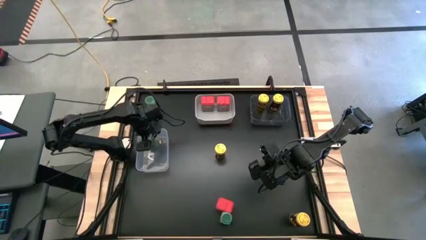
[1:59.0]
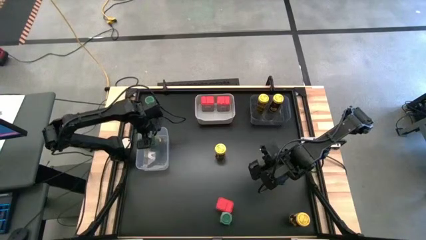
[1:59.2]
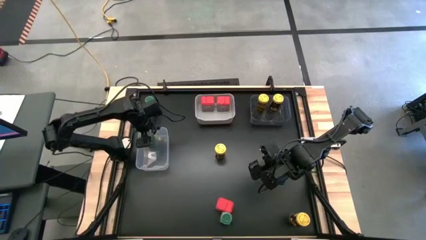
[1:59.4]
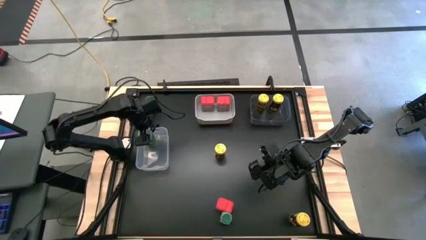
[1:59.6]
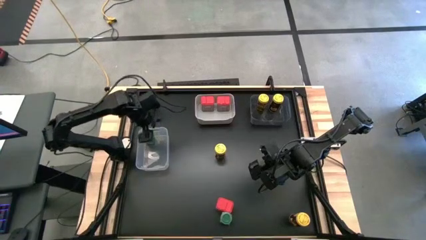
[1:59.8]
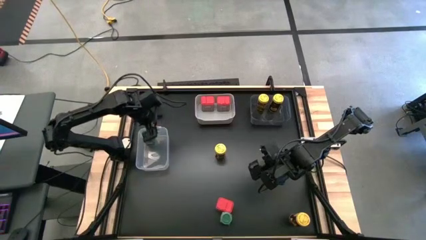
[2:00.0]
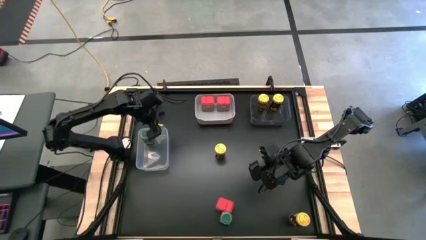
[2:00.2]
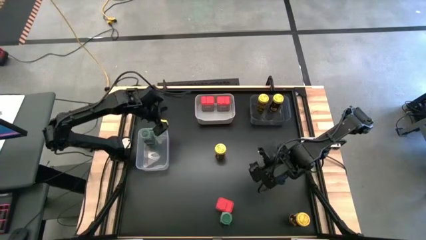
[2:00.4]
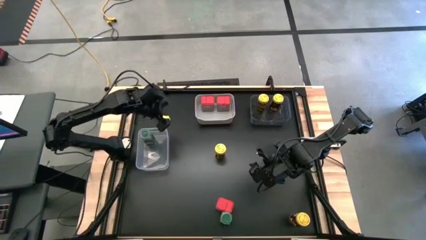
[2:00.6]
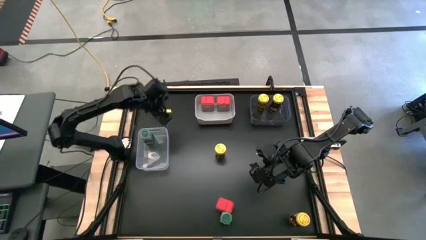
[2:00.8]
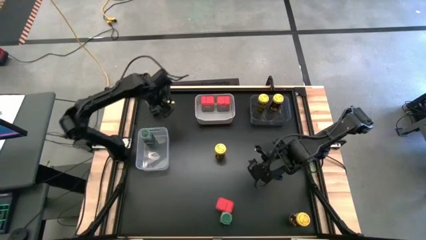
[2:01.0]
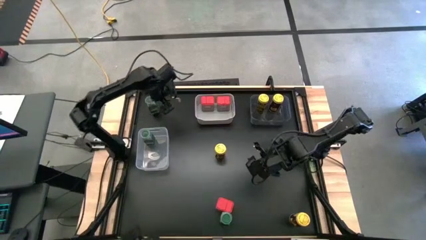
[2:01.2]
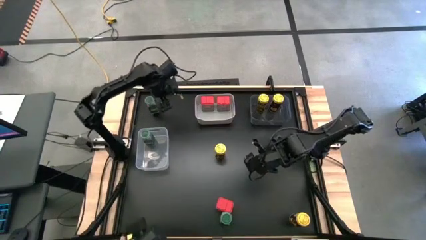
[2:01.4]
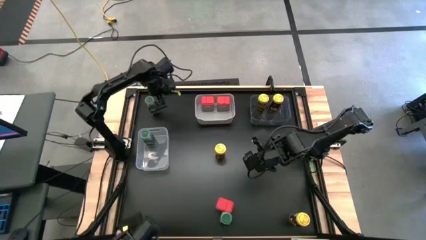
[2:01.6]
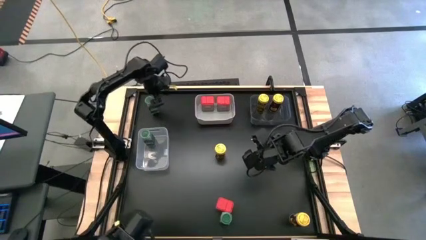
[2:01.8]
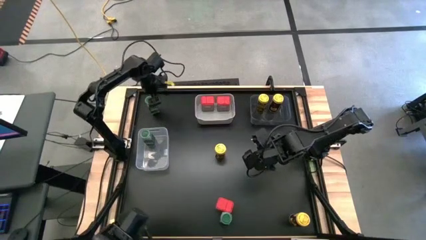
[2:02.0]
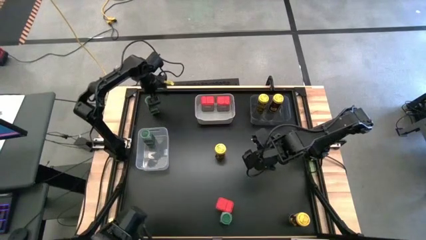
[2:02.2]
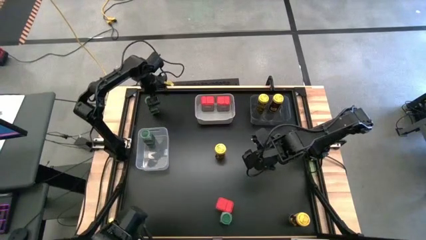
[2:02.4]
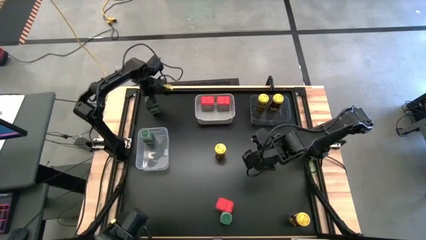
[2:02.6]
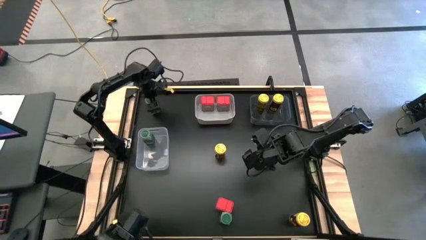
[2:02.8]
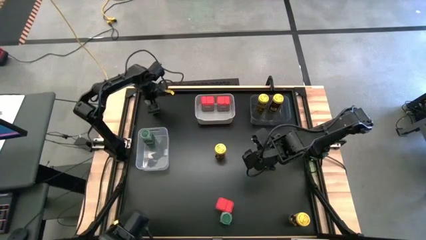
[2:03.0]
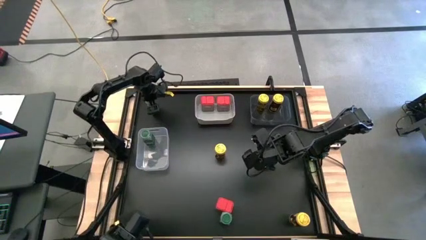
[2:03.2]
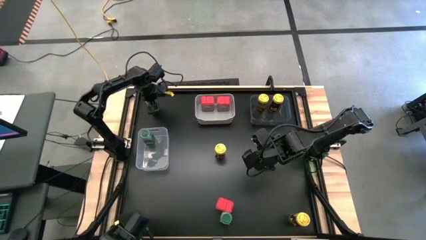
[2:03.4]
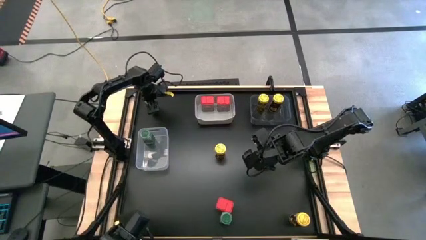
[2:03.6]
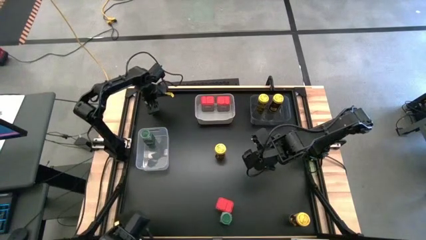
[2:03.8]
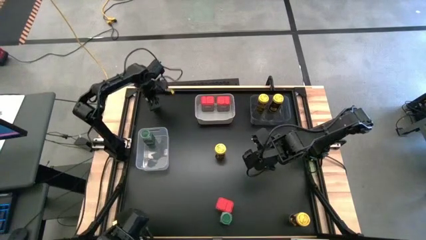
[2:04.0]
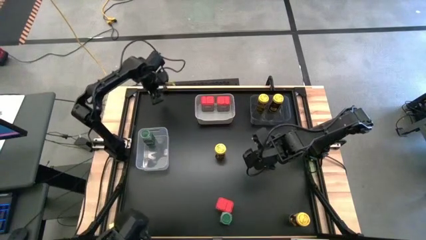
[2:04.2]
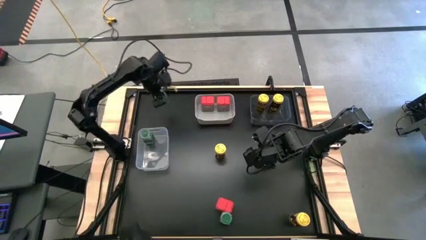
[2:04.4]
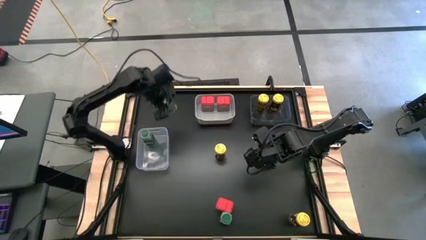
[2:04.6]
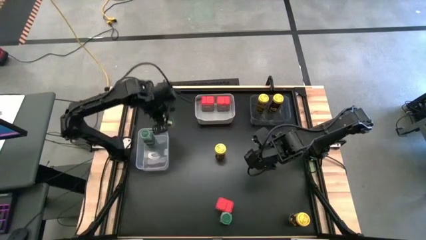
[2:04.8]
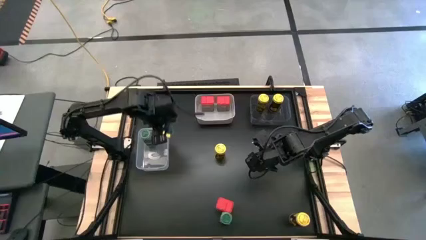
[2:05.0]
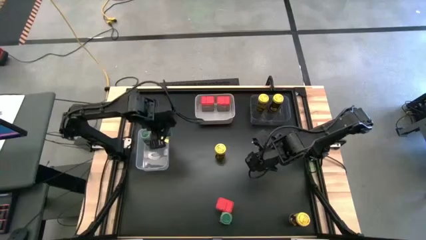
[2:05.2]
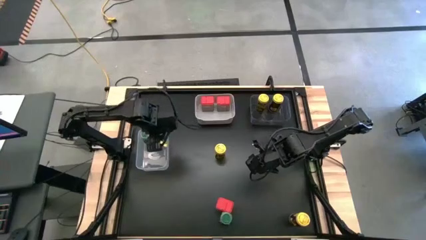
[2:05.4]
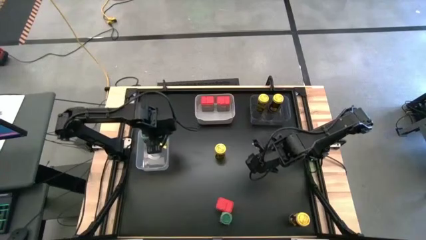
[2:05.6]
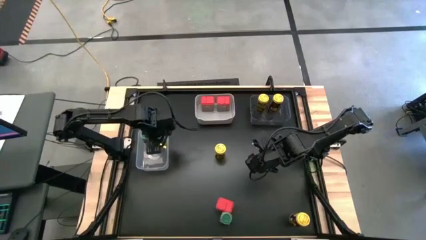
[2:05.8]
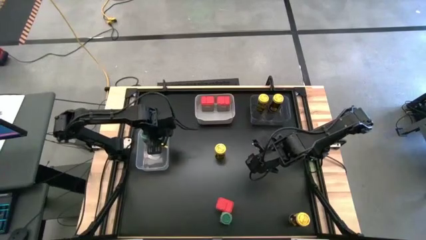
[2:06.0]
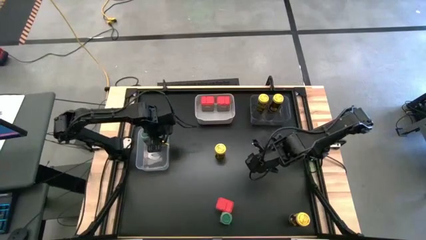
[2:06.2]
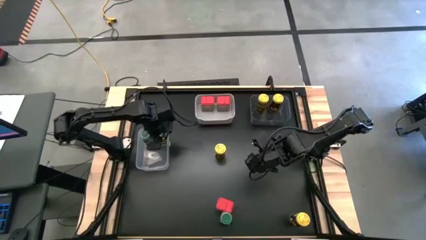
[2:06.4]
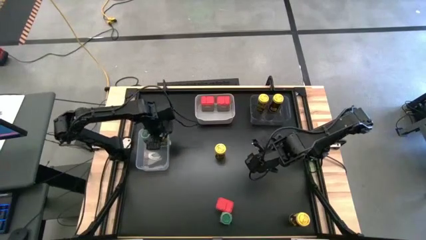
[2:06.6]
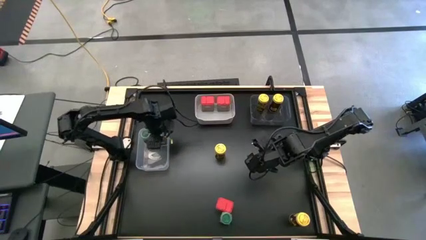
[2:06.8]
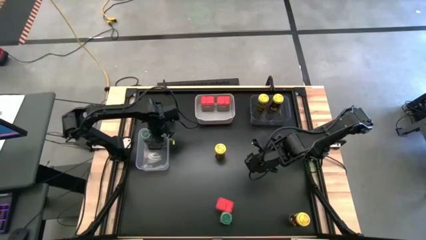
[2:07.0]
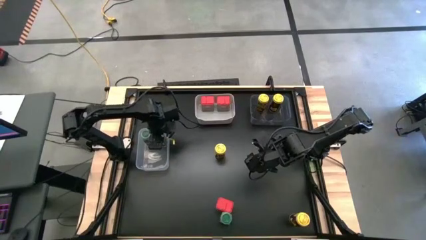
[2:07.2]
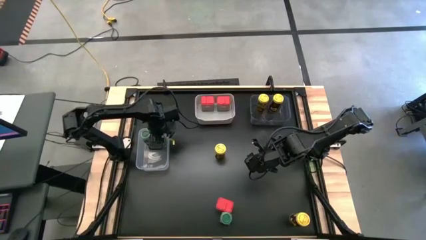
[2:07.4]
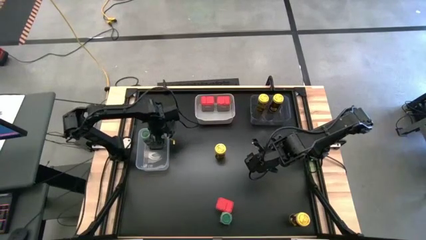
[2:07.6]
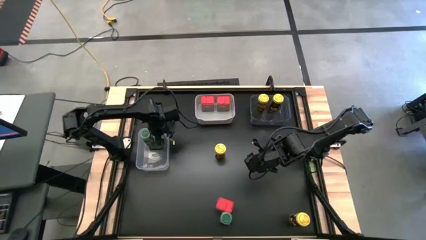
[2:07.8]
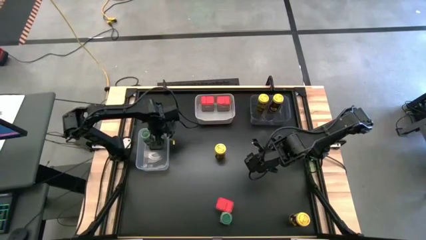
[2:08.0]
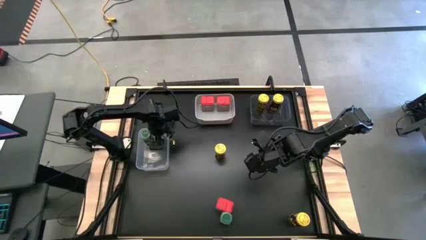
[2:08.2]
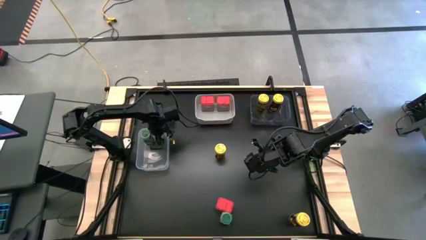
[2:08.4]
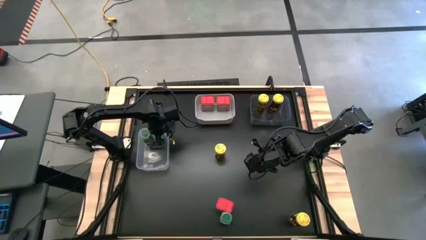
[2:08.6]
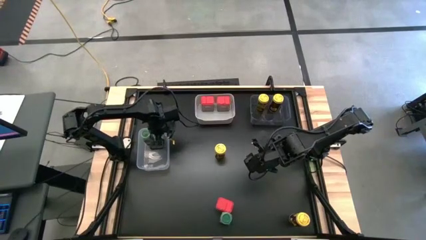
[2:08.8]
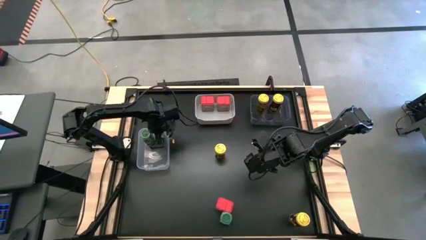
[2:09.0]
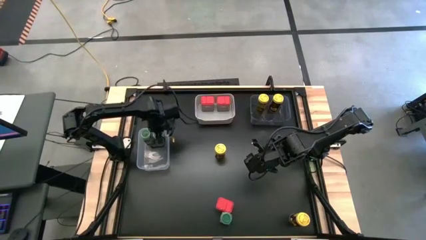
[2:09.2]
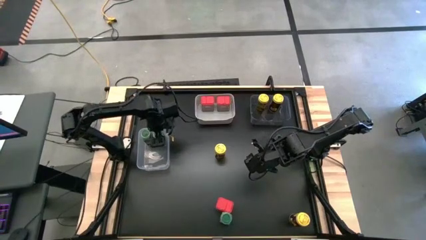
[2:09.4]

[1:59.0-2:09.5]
Task: Sort spices by type
Put the top green seasoning bottle into the transparent bin

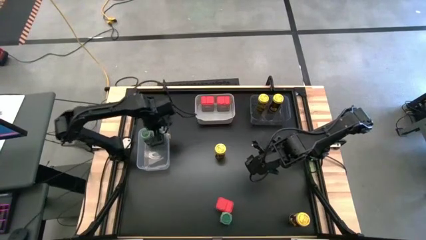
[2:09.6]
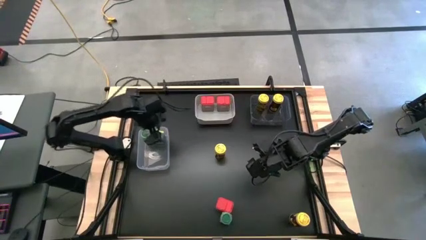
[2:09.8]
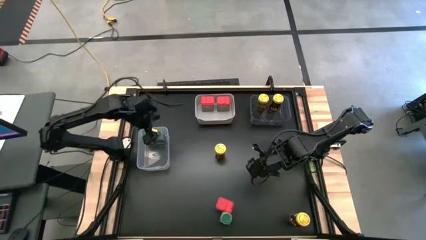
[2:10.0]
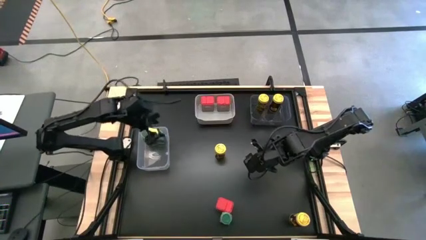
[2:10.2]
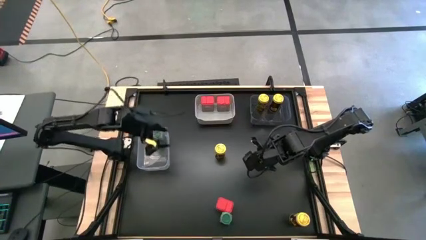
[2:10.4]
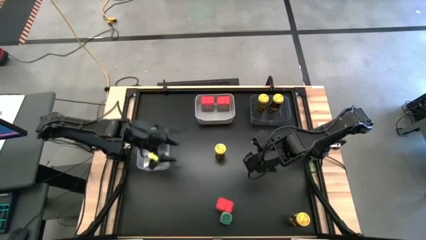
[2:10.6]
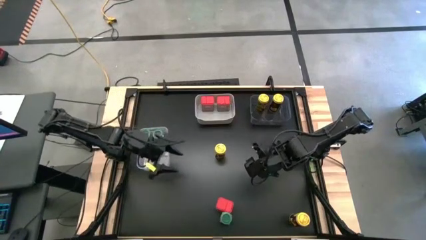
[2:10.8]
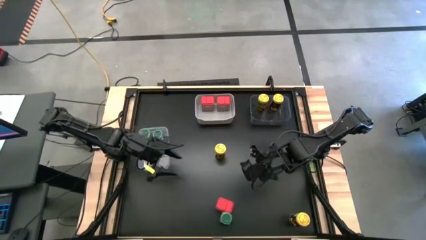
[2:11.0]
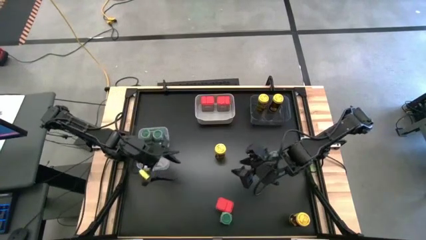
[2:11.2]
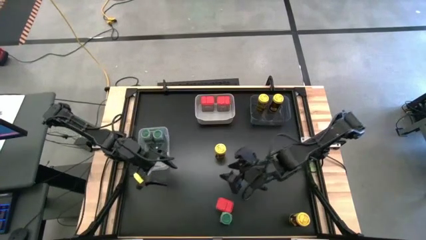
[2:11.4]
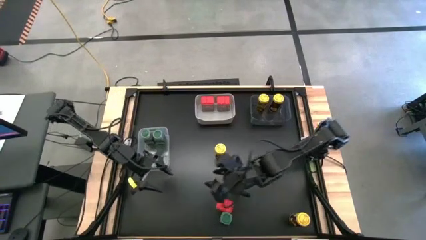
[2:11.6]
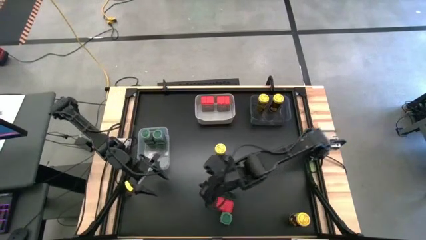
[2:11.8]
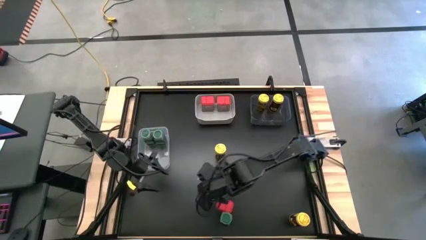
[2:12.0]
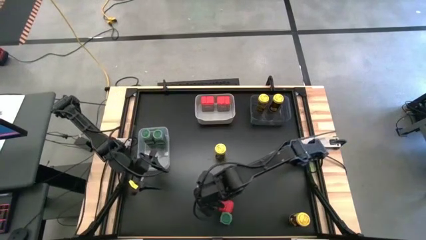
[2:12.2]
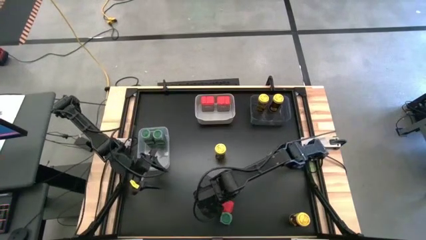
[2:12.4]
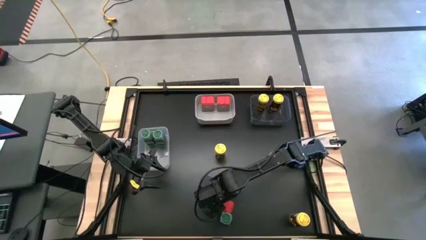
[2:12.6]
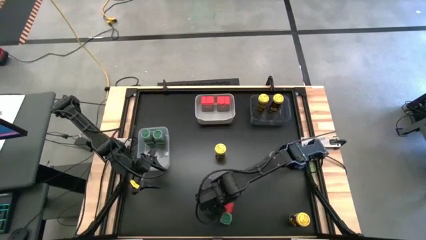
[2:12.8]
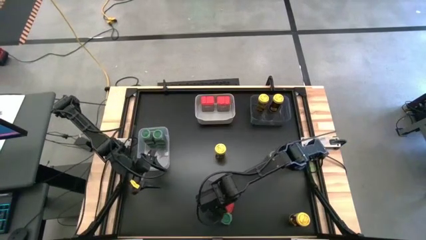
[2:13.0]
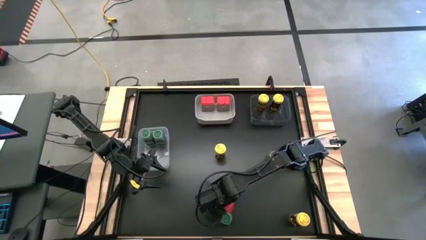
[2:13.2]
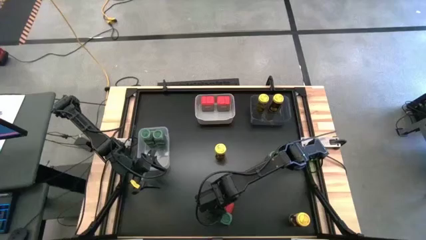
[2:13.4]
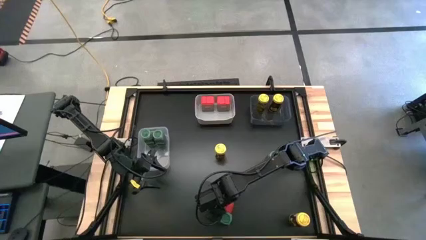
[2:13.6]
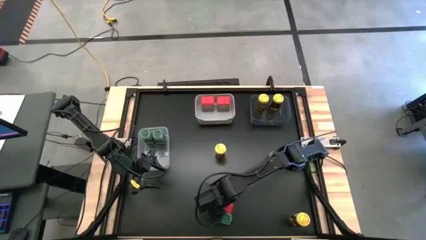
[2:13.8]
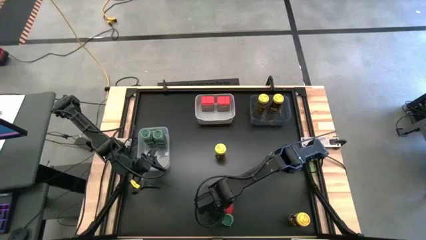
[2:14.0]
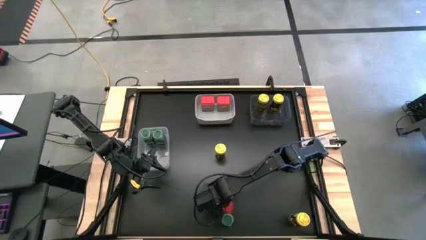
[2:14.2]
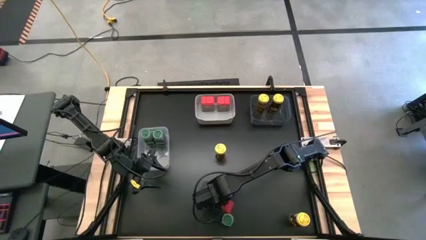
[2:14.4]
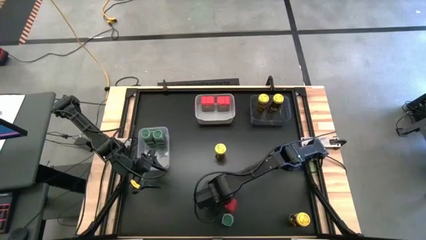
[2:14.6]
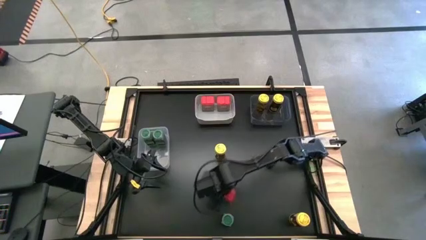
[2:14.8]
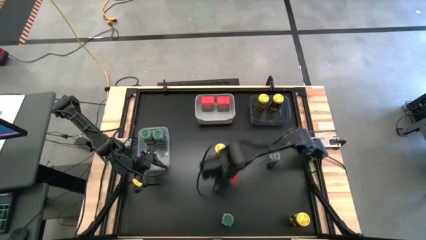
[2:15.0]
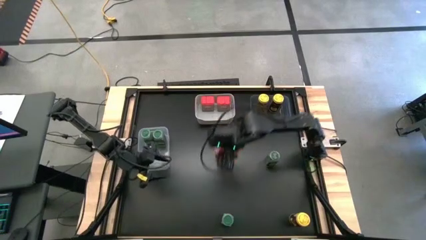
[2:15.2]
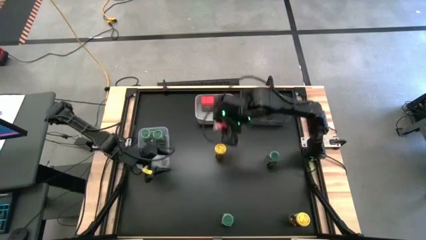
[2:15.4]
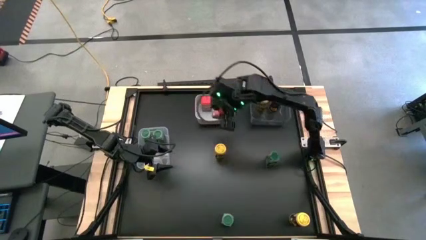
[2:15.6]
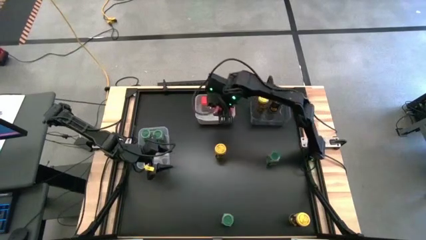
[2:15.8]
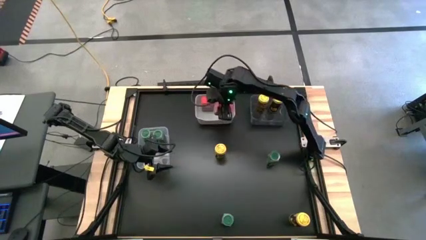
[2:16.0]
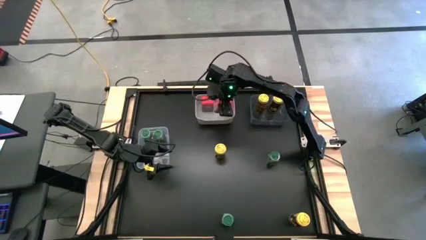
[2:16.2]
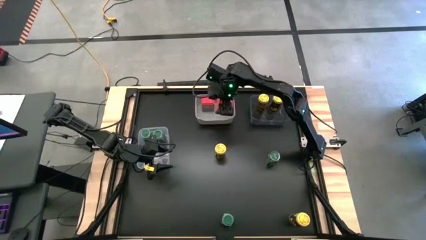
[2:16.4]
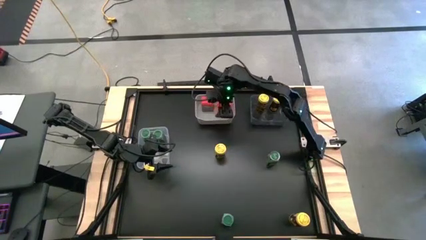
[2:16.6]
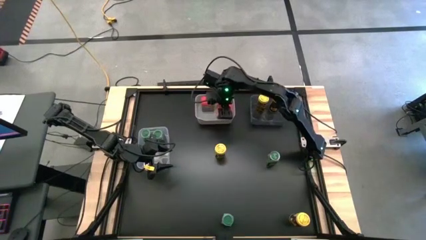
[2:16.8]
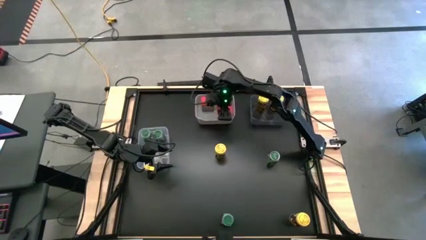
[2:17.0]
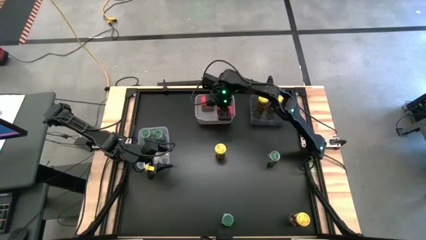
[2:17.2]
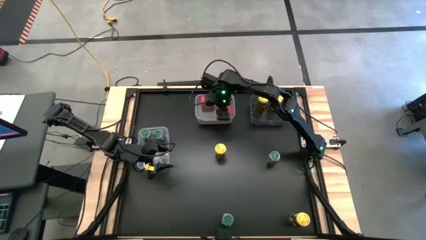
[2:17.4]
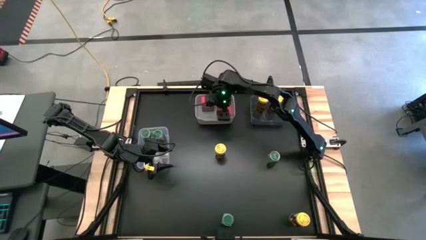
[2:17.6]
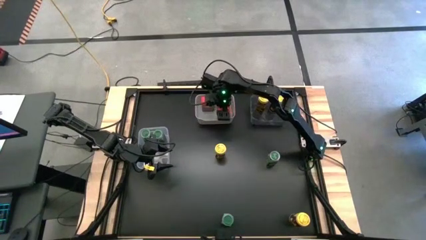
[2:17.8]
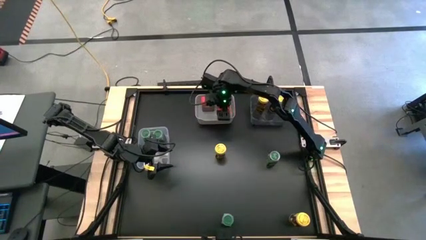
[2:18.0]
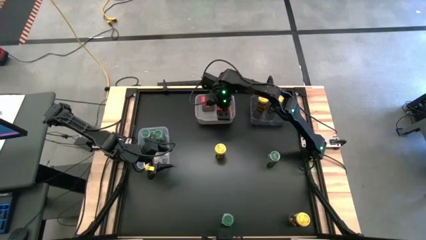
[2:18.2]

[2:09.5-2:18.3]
Put the red seasoning can into the white bin
